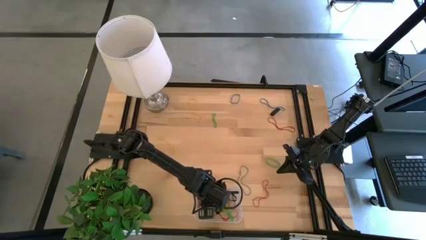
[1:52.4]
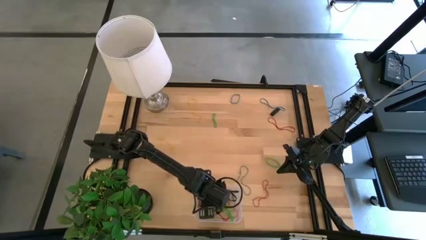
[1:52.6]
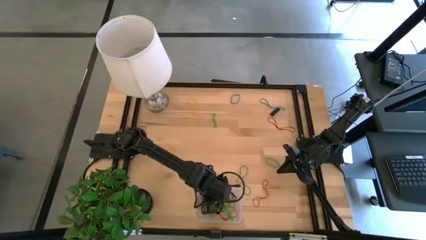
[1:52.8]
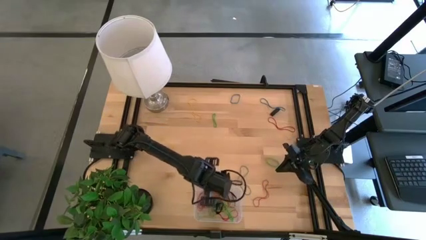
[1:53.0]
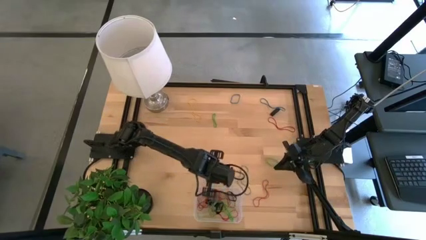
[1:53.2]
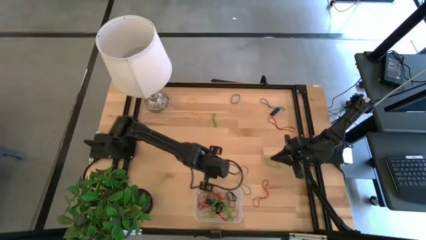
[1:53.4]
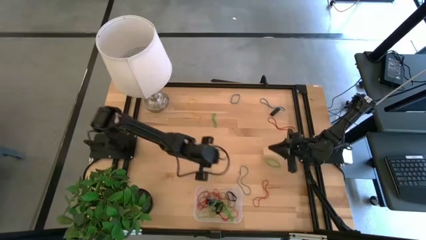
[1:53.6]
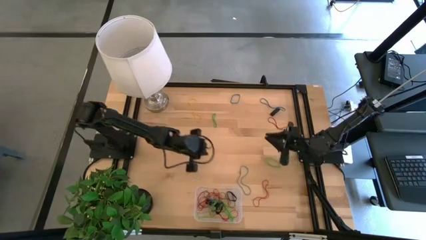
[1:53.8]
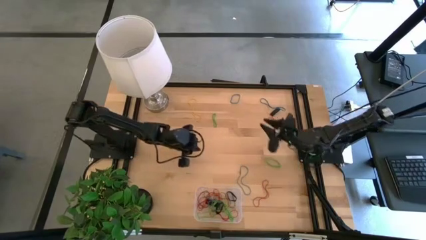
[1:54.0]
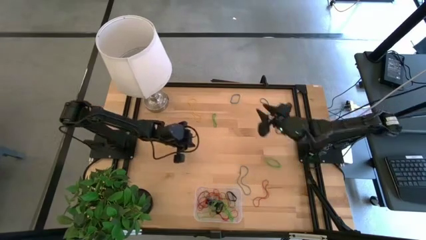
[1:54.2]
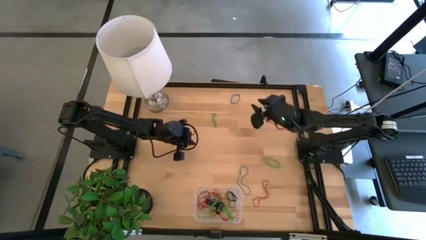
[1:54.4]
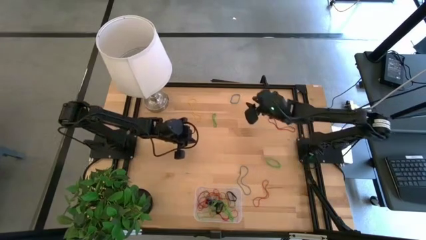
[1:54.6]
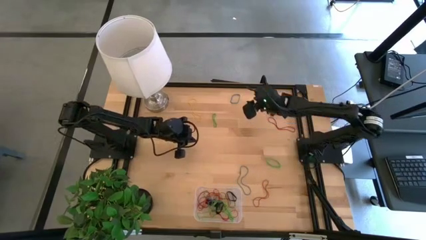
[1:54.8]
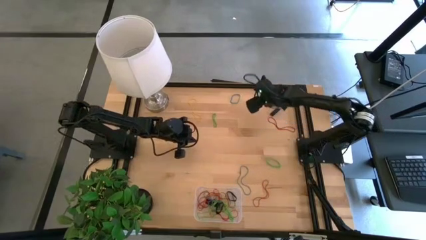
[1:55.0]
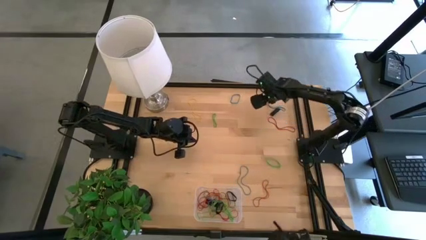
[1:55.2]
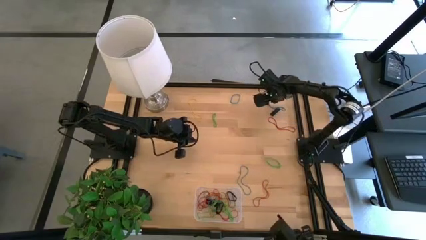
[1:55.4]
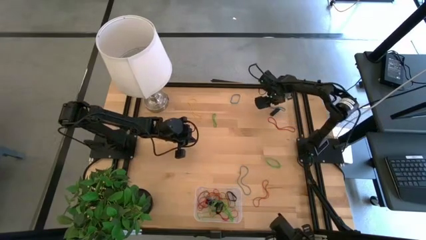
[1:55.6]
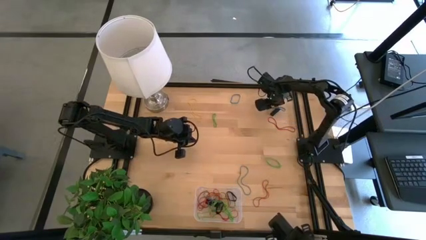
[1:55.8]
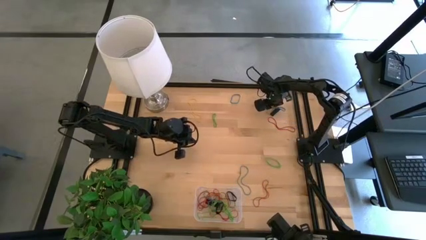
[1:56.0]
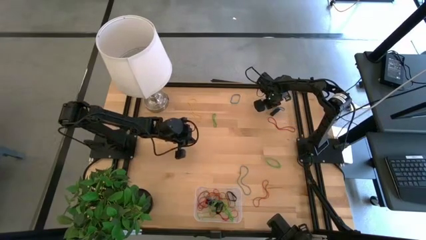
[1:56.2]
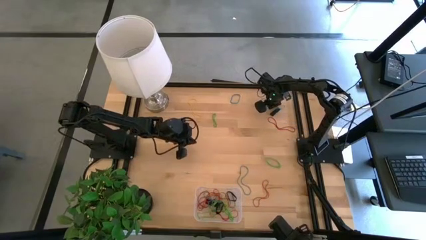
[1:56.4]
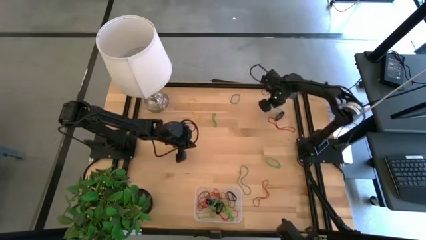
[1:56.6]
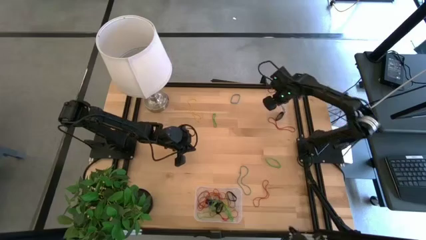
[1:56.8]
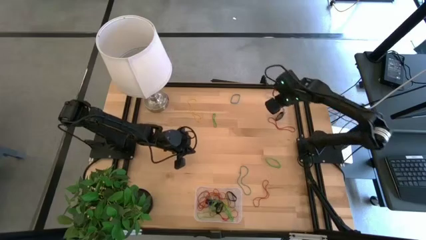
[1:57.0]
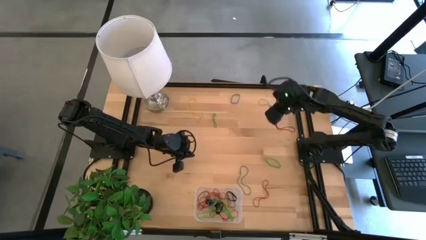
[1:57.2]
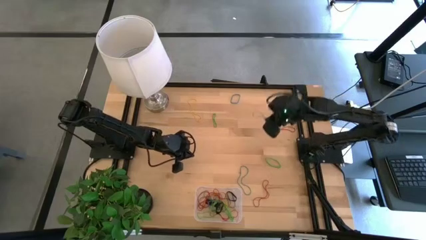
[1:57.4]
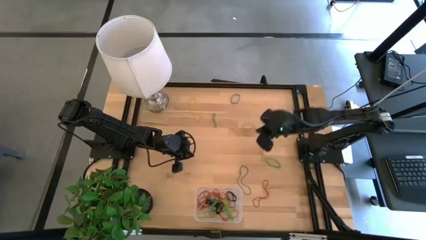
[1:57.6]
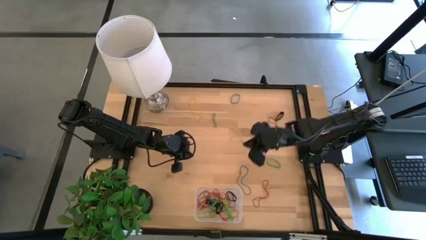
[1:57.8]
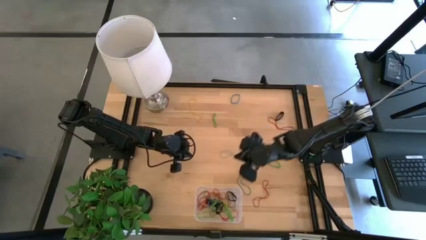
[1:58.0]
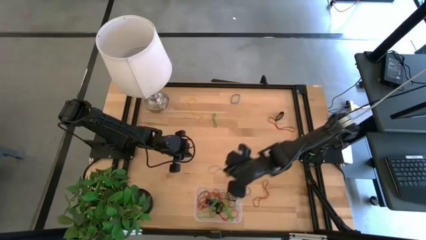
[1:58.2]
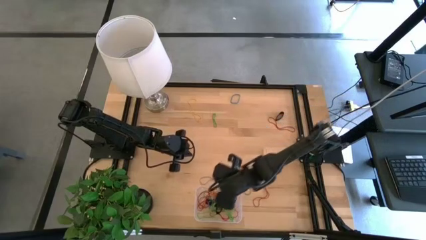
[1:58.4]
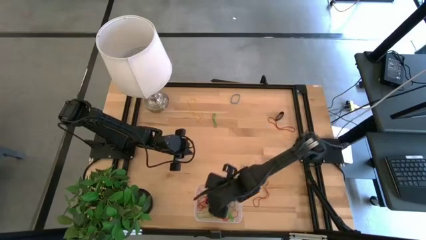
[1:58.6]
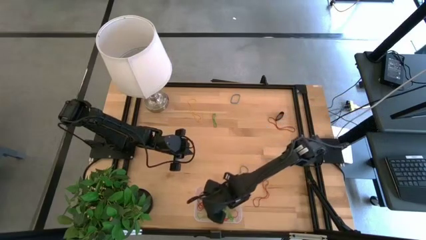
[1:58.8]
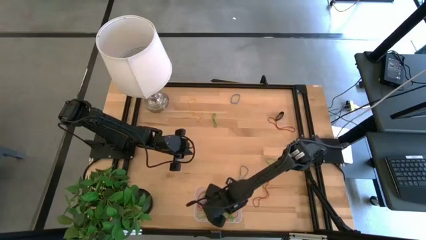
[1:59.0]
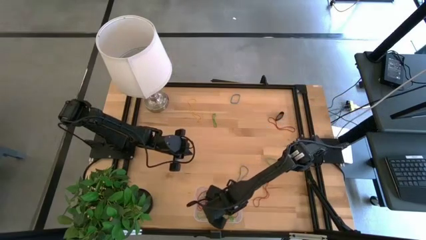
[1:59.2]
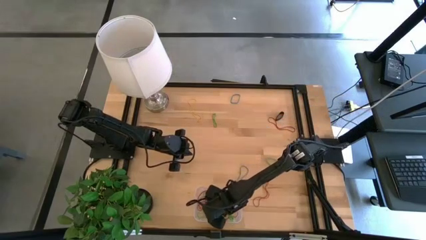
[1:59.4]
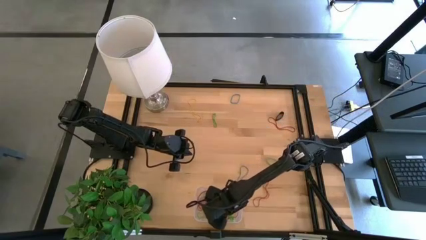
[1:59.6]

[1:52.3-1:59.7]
Task: Pick and place rubber bands into bin
Put the blue rubber band into the transparent bin

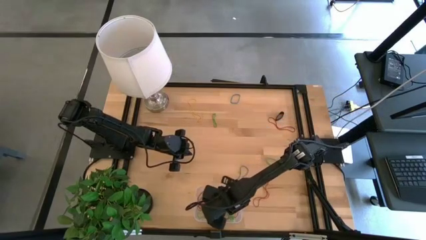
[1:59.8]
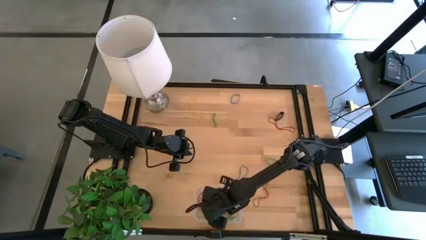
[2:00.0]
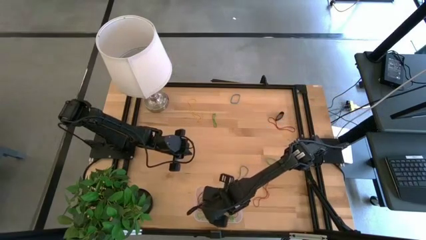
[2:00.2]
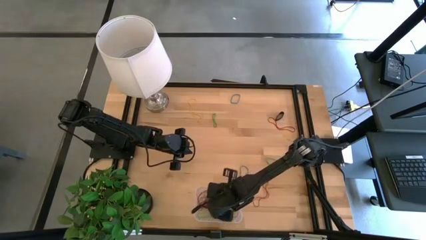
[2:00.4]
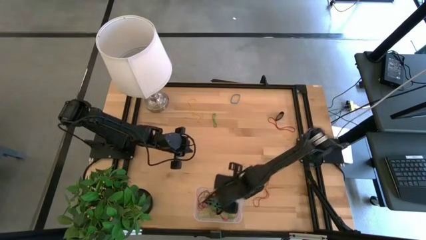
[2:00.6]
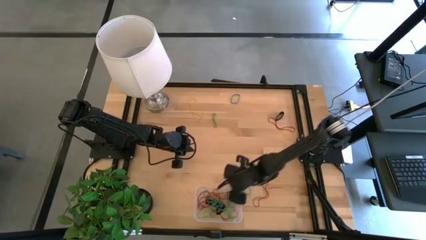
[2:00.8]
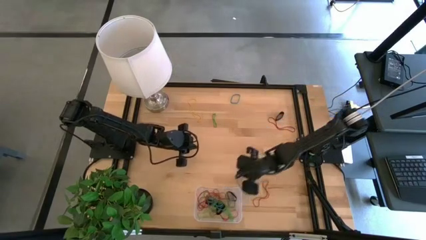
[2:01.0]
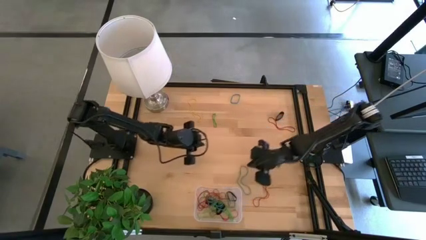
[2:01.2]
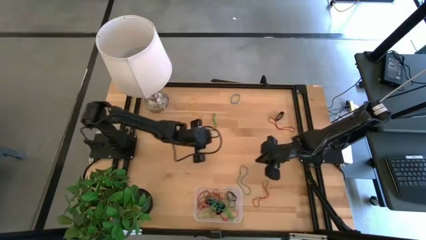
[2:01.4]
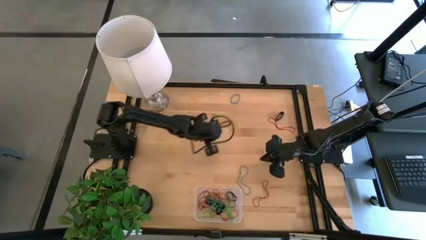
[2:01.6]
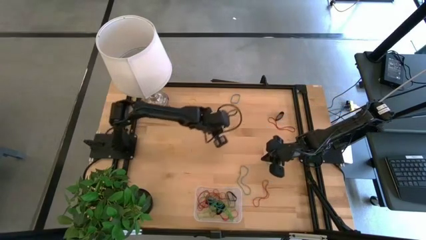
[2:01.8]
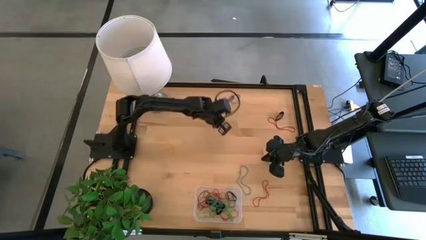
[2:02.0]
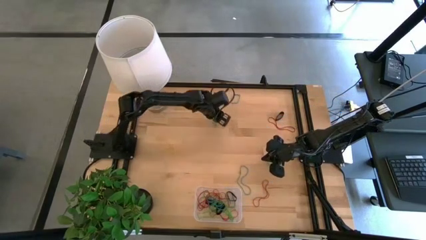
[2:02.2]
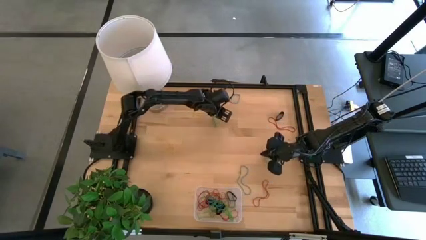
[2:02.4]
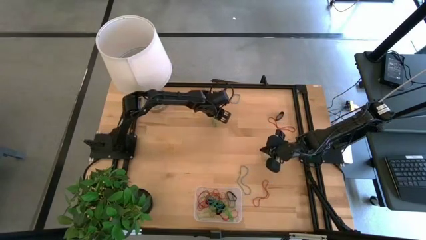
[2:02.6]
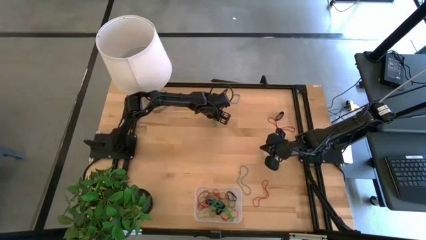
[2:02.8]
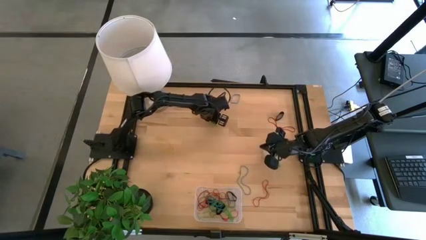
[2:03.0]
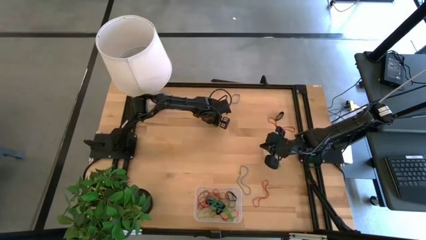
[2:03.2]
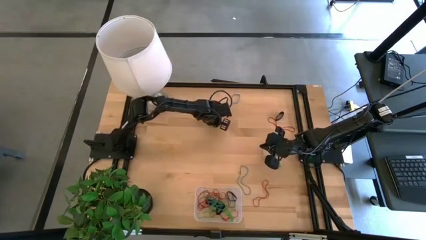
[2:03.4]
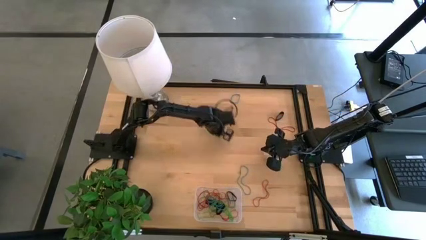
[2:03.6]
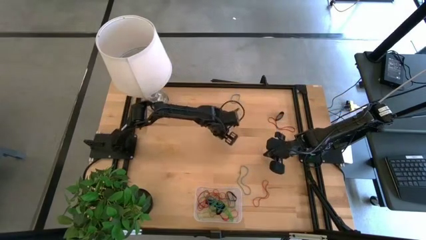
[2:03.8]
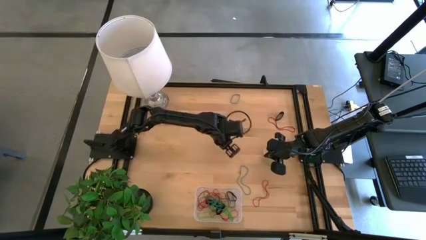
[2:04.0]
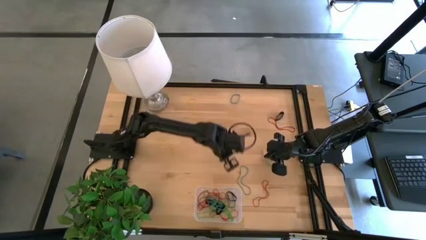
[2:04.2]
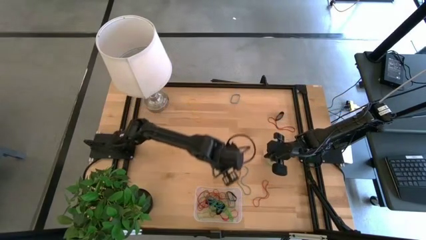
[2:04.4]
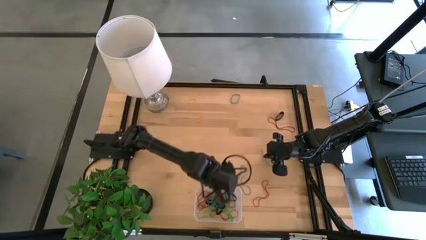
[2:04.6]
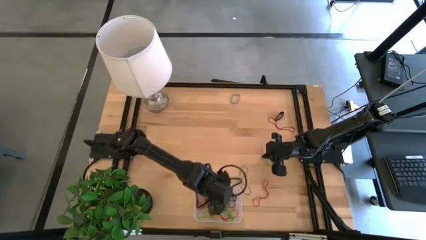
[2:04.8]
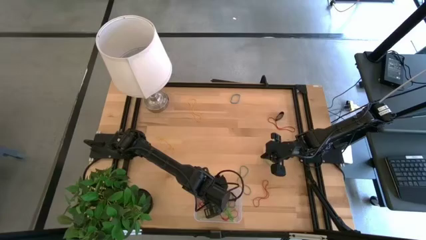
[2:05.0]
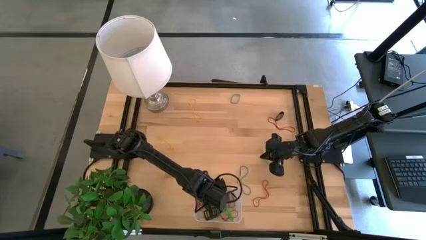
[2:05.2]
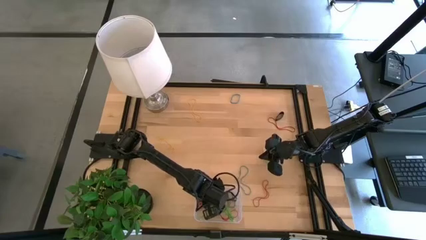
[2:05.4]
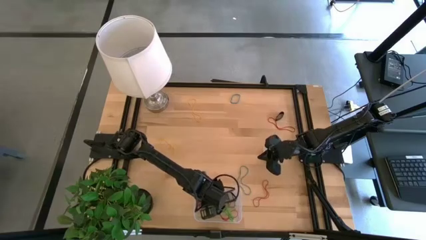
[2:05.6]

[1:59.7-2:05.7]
Put the green rubber band into the transparent bin

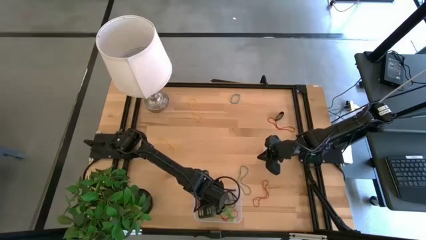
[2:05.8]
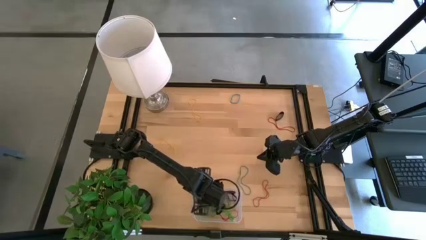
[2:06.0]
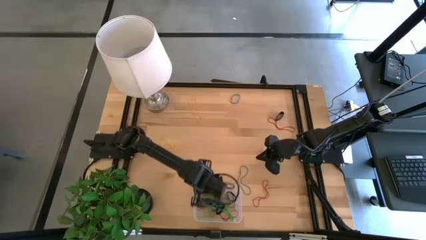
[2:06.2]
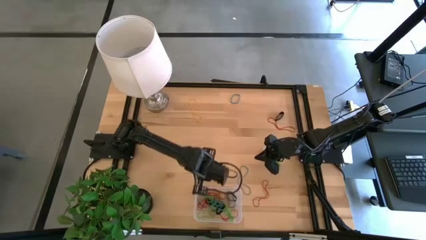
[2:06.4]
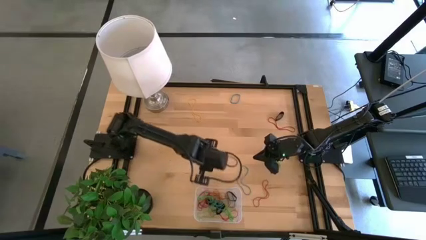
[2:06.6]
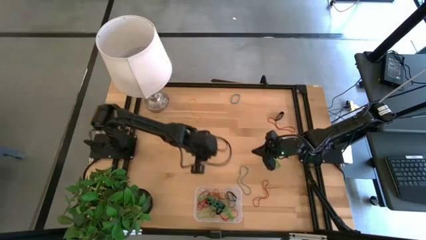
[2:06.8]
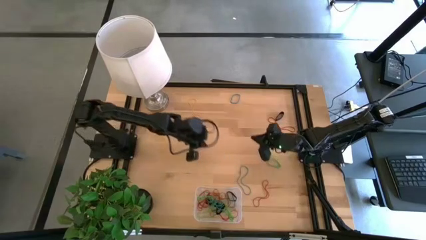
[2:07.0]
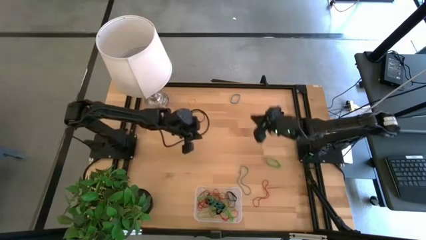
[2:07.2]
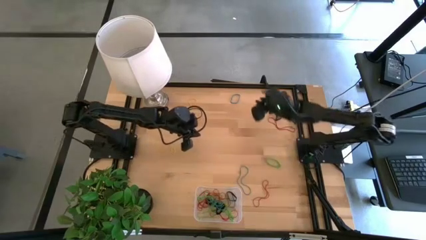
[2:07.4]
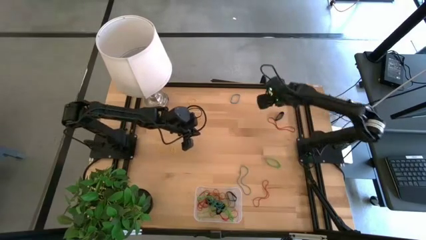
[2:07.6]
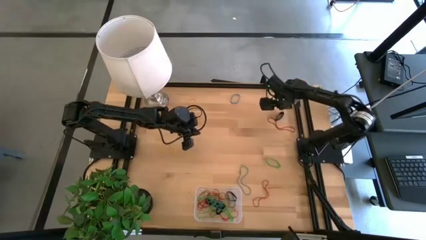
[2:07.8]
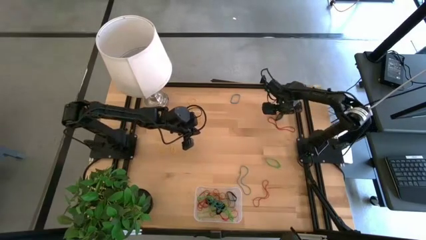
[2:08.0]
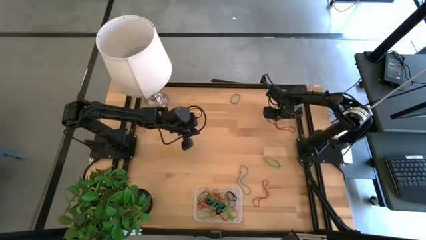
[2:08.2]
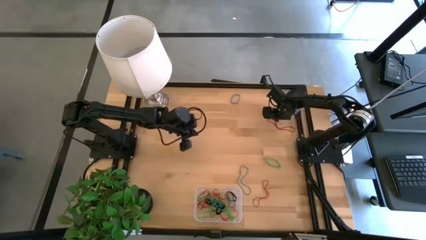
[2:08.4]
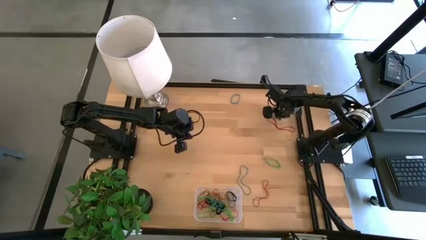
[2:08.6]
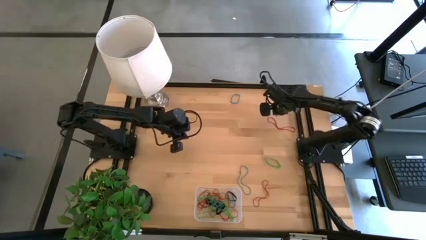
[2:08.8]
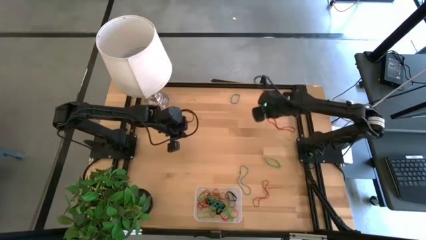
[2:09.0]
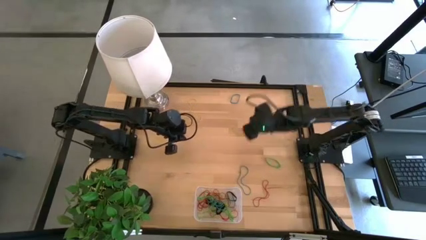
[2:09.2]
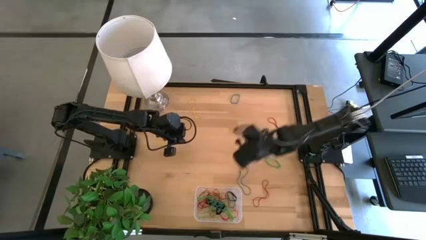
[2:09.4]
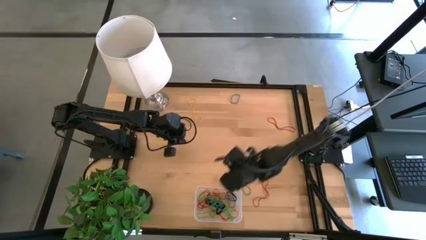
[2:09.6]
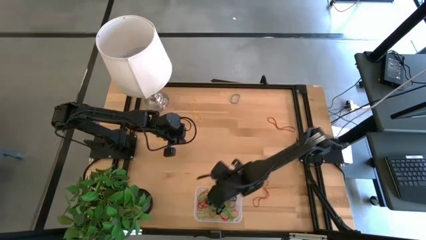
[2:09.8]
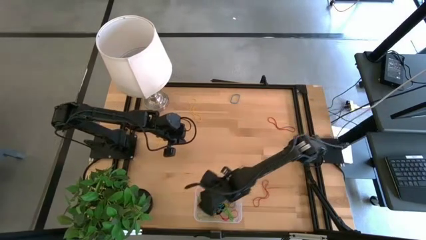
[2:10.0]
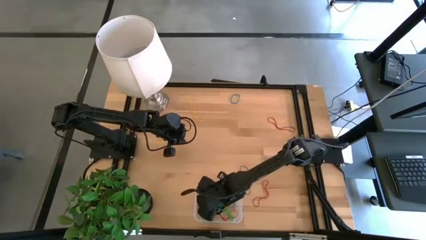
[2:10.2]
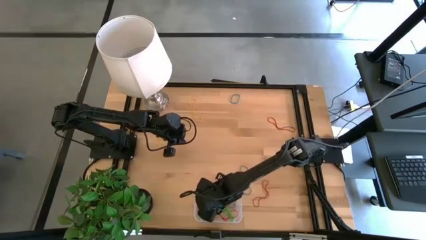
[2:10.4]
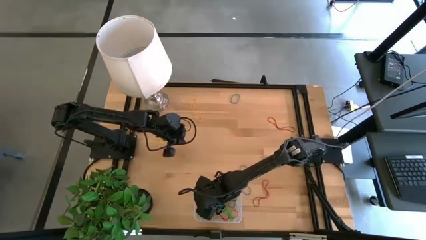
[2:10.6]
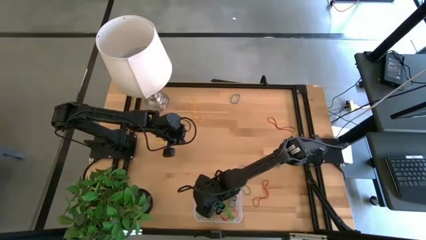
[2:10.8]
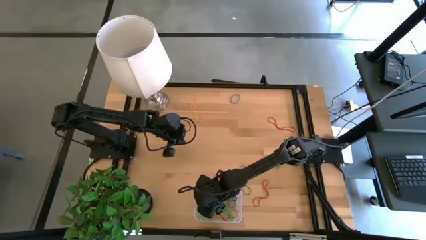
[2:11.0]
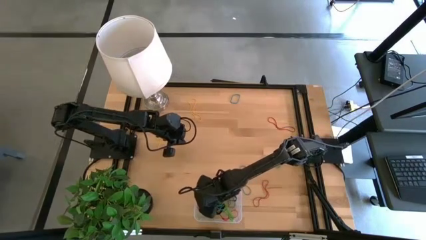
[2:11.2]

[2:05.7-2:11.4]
Put the black rubber band into the transparent bin
